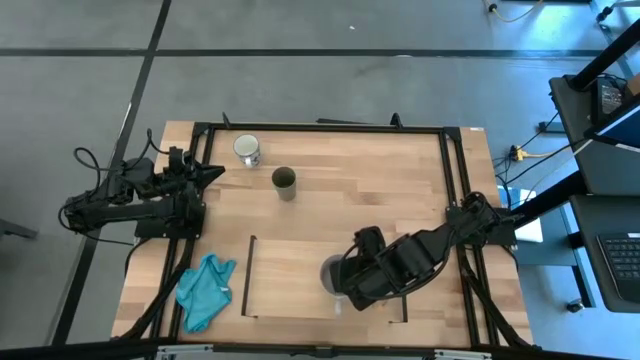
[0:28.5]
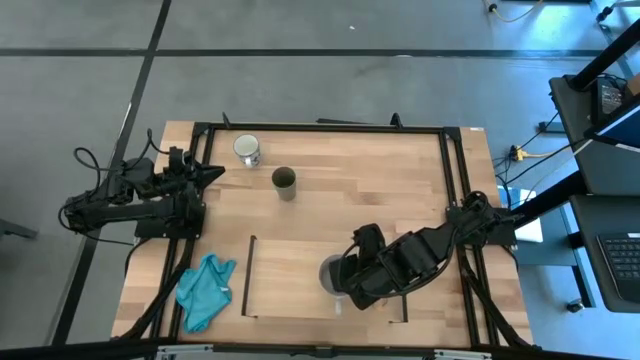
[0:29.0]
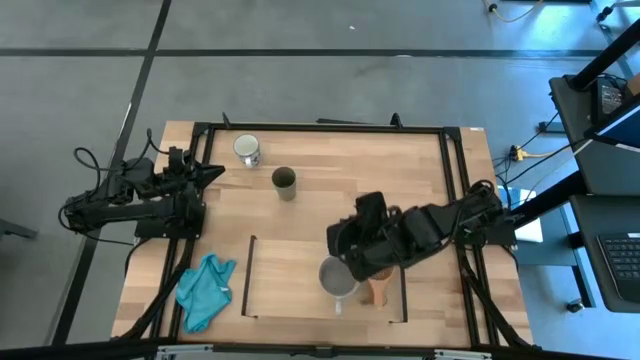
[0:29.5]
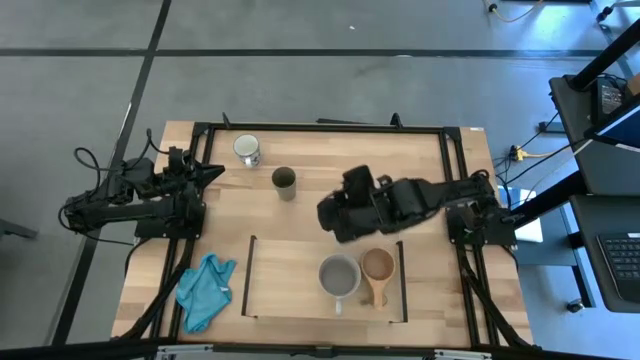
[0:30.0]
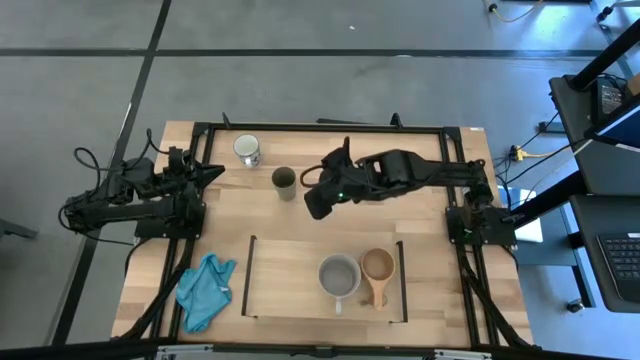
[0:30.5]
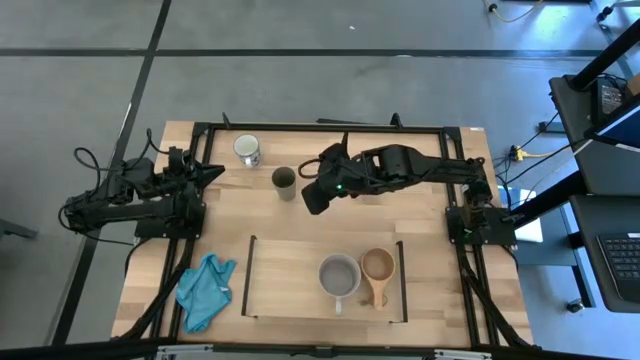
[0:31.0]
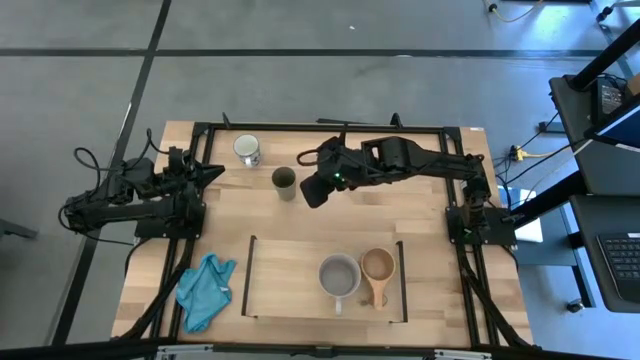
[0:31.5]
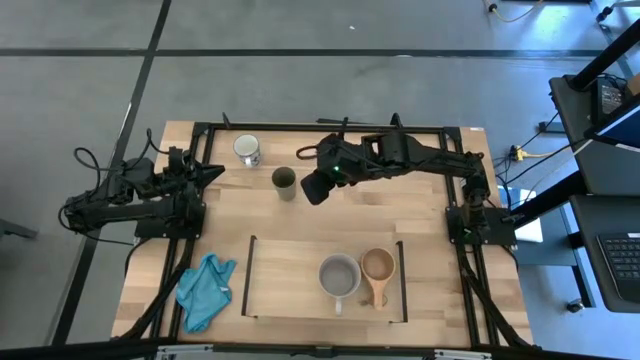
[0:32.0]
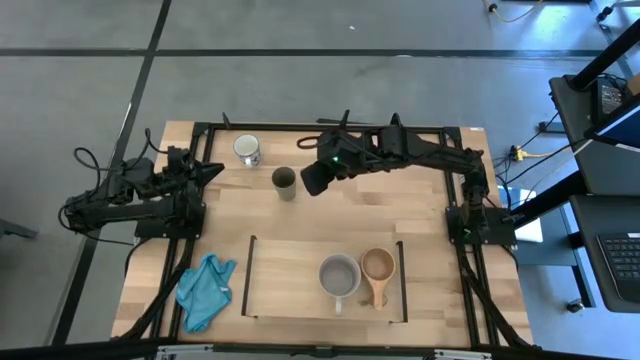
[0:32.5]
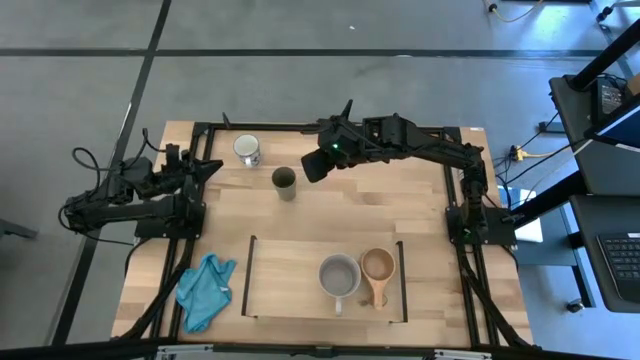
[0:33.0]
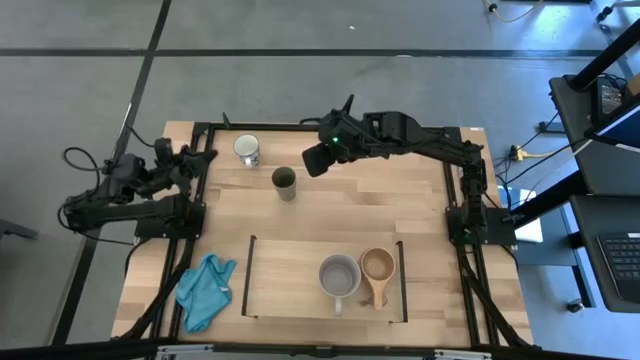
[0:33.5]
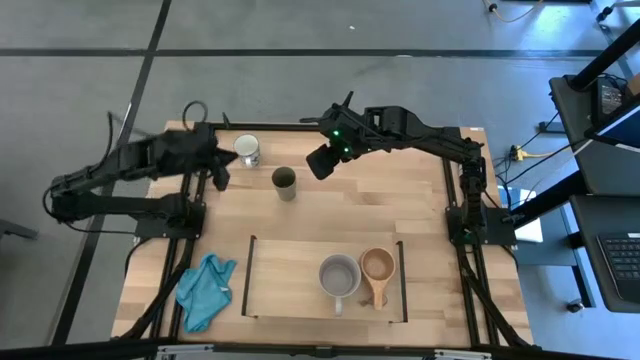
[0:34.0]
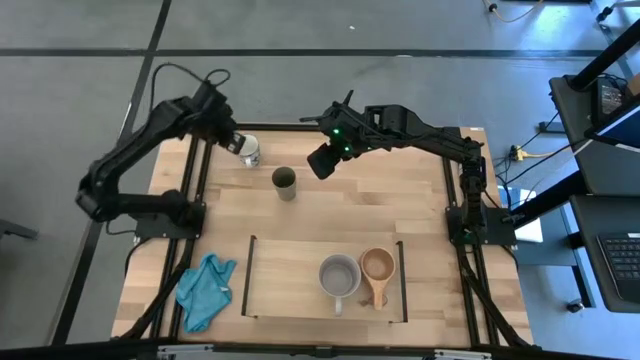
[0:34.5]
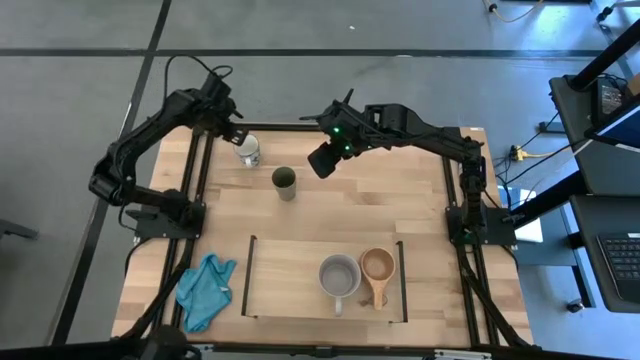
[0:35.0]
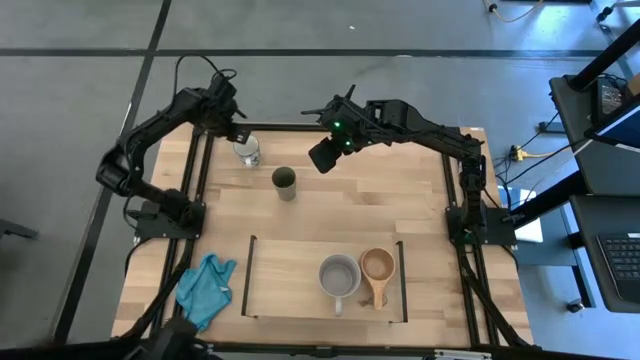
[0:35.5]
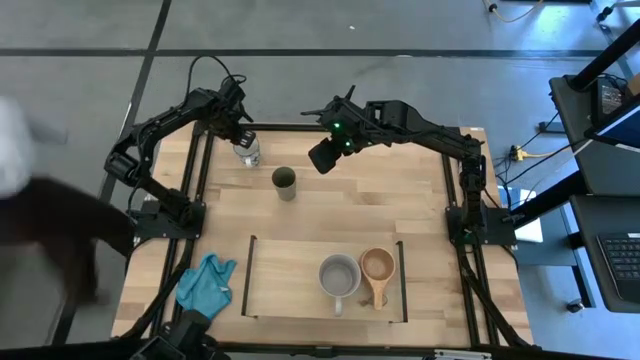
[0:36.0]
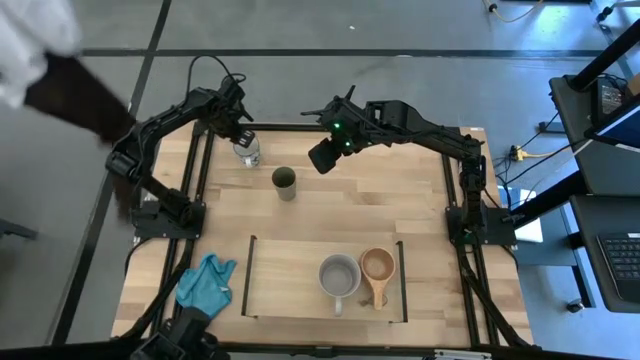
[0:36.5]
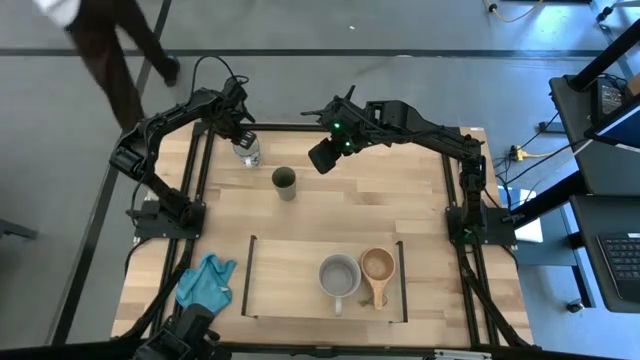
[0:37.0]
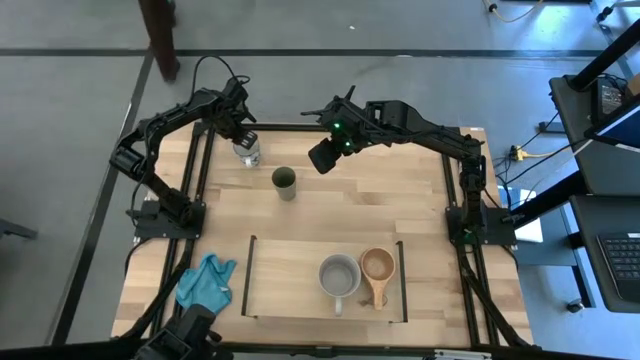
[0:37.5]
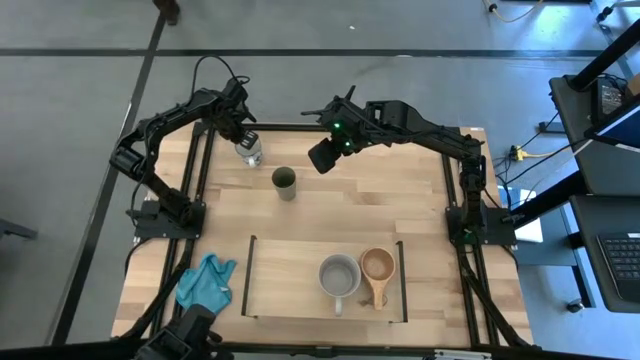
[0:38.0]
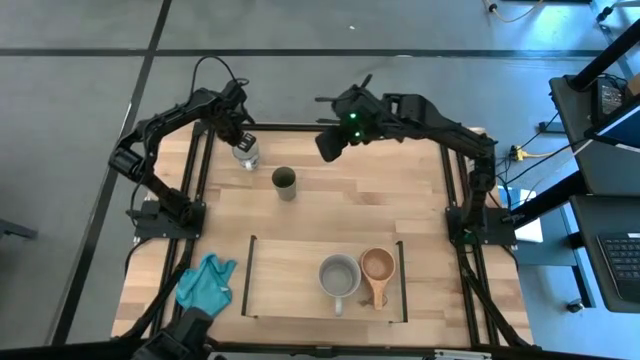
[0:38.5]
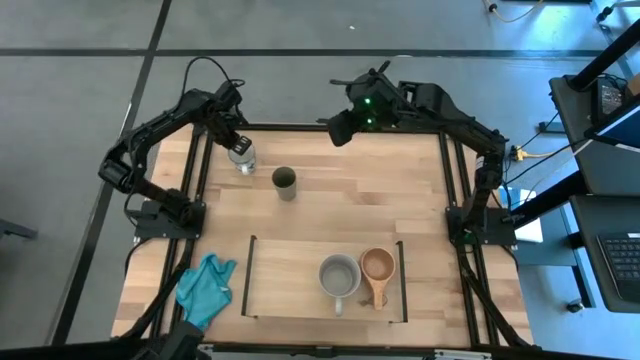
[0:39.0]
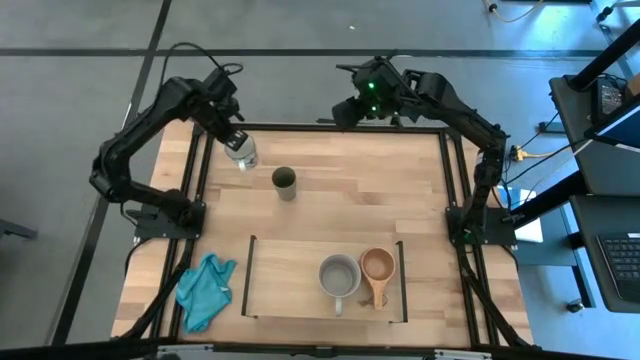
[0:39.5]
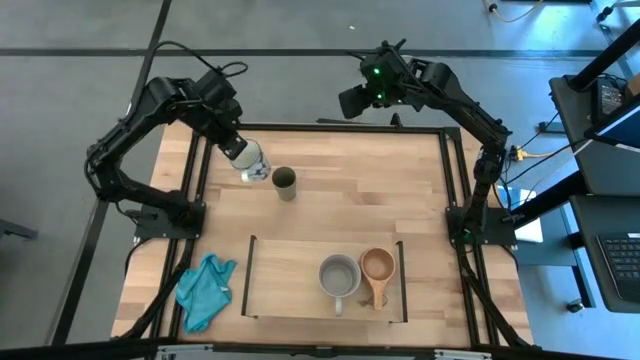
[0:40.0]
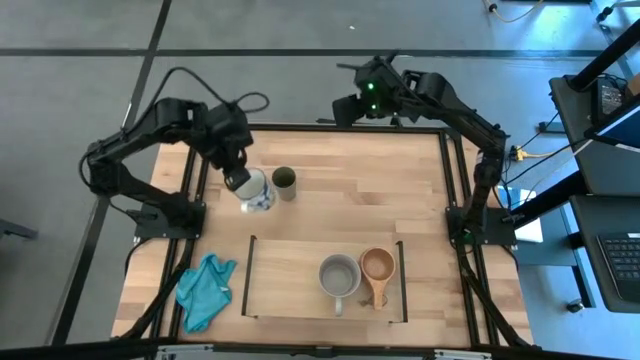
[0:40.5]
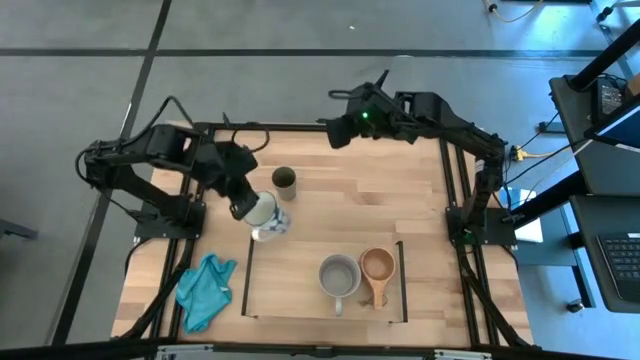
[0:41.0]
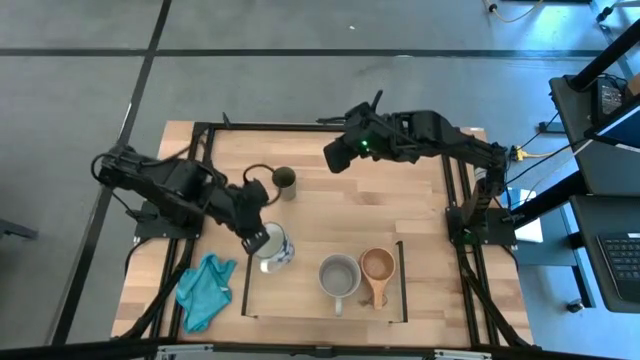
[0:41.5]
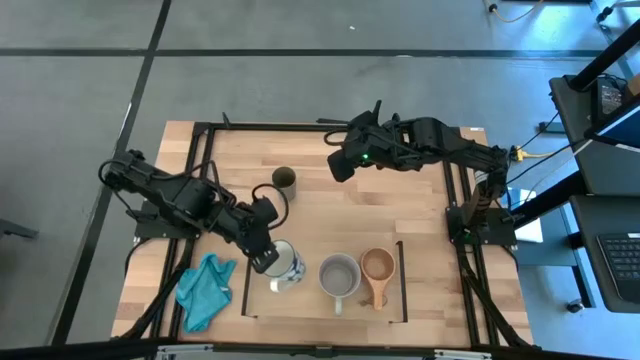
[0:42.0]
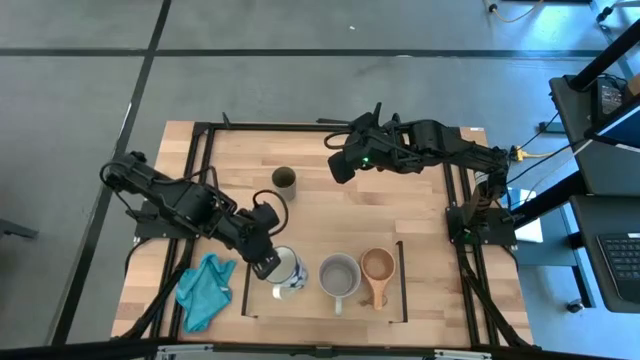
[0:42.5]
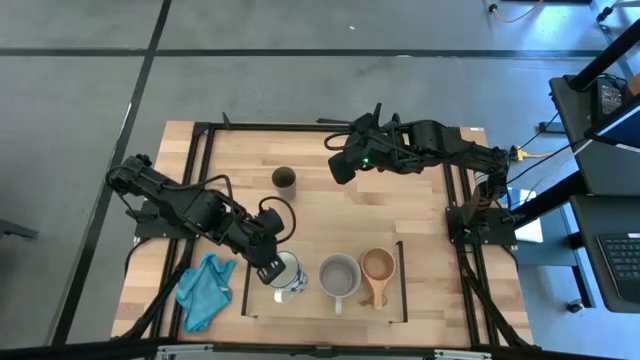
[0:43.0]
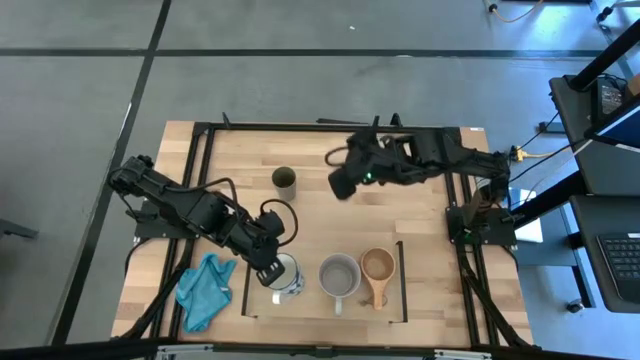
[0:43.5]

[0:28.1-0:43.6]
Task: Stack small to large cups/mugs on shelf
Put the white mug on the shelf

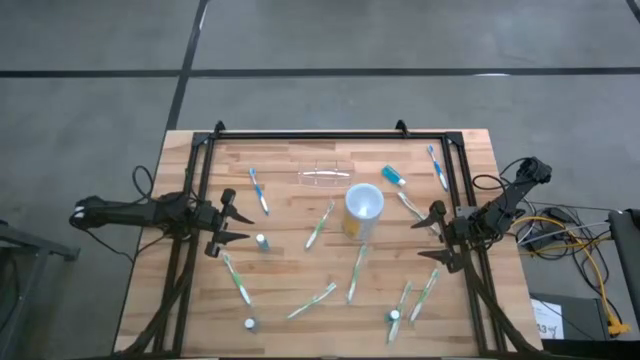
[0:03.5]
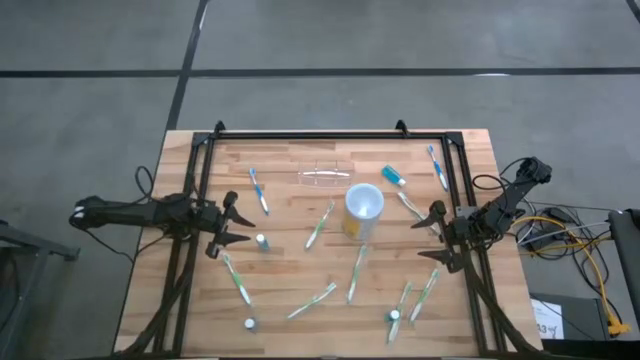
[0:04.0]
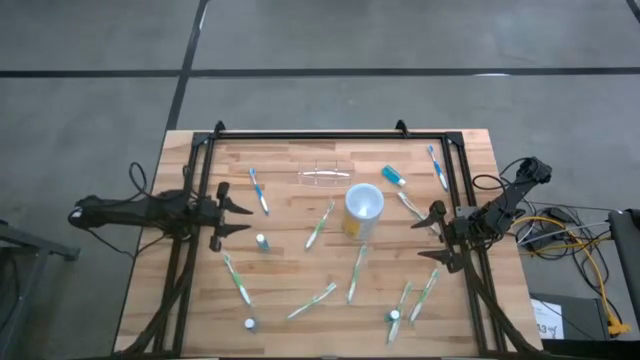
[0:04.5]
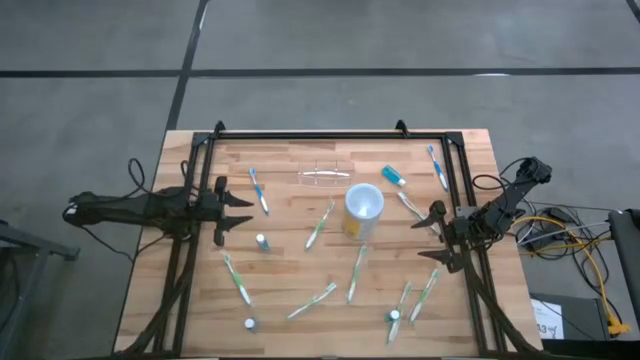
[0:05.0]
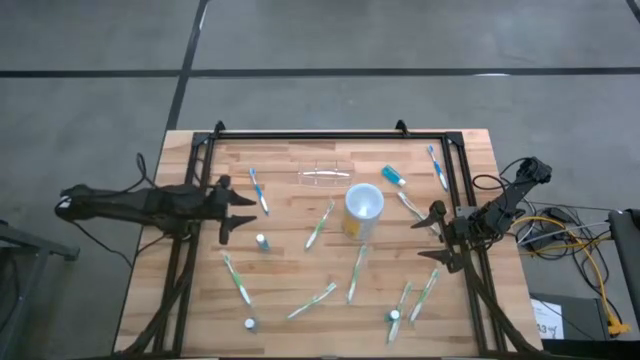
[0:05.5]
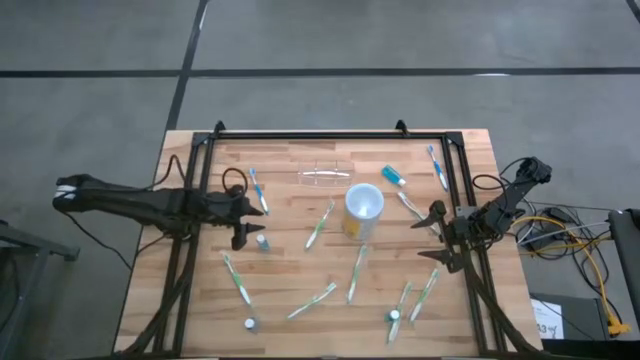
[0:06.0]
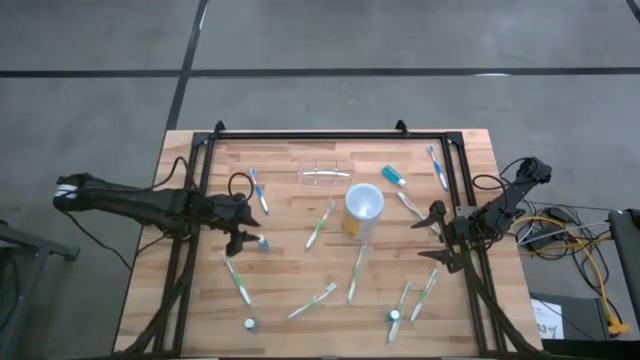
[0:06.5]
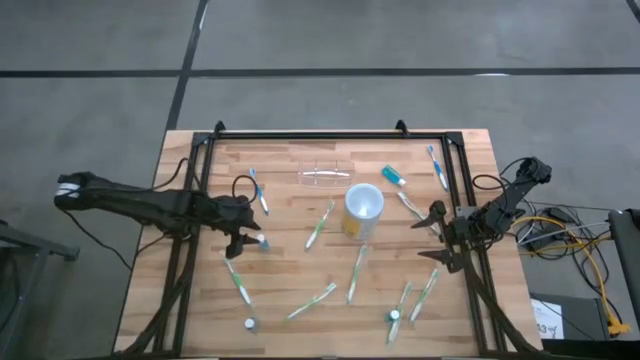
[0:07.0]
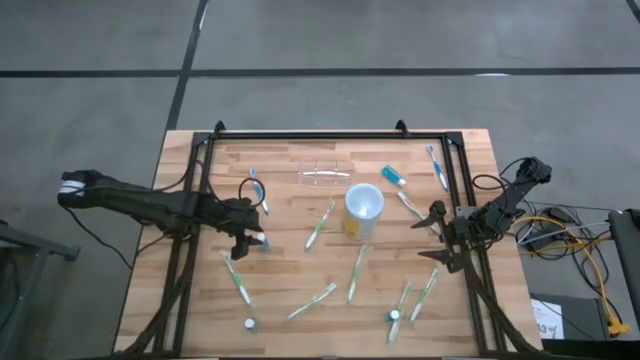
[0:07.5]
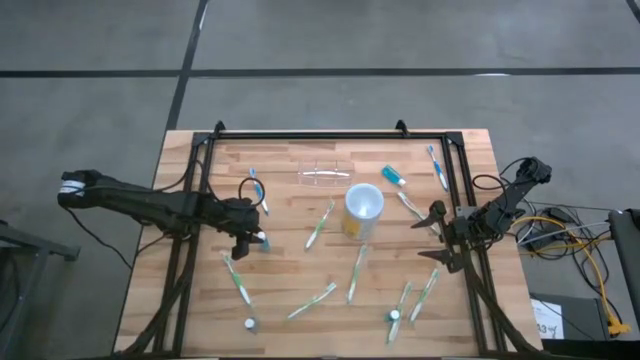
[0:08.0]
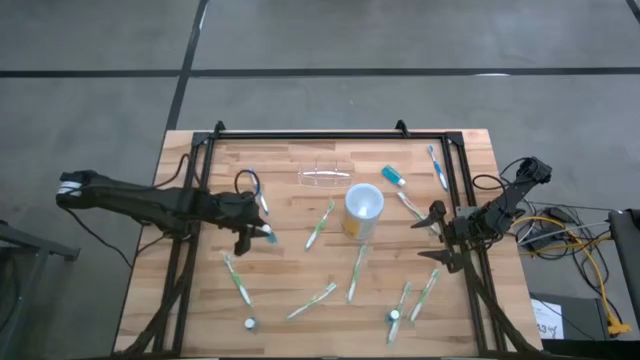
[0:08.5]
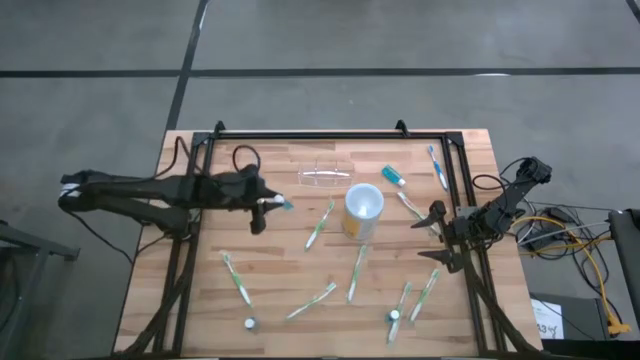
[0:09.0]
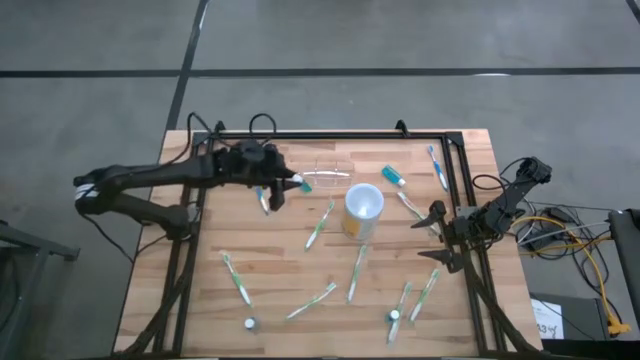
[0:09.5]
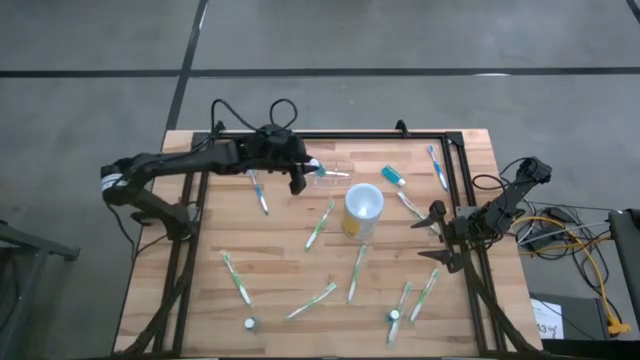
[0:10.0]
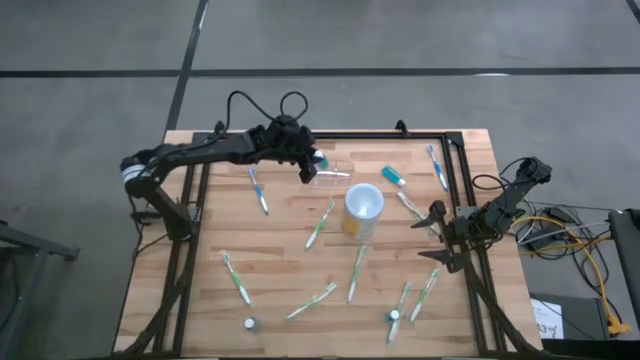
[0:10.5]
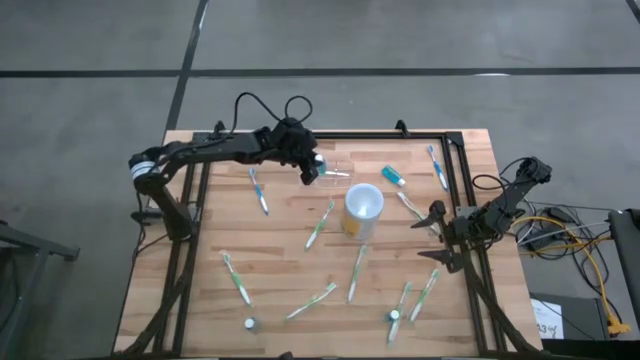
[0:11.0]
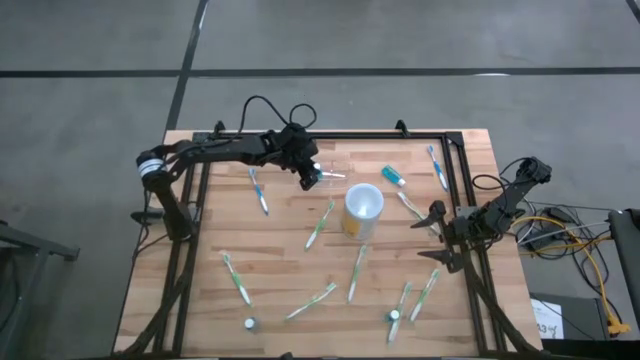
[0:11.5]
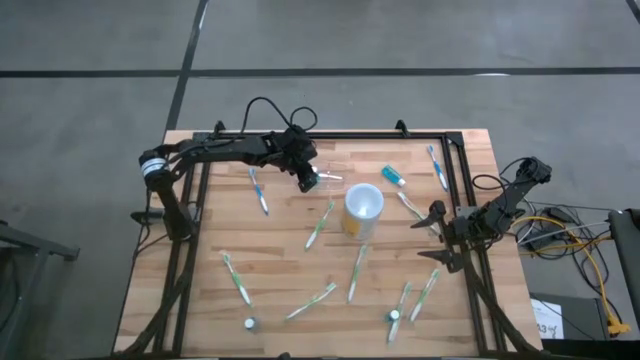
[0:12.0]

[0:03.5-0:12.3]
Task: Pick & Place toothbrushing station
Put the blue mouthwash into the middle section of the transparent organizer
